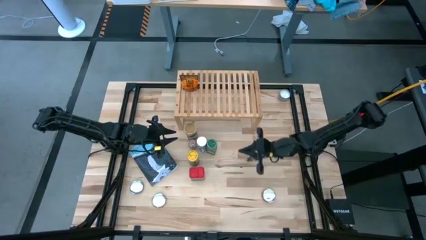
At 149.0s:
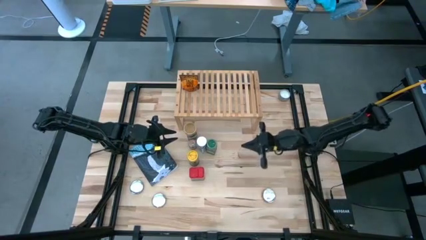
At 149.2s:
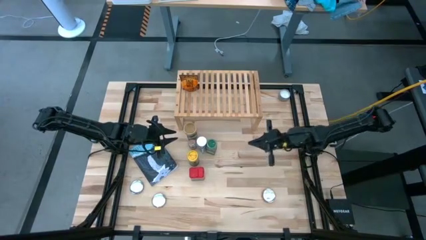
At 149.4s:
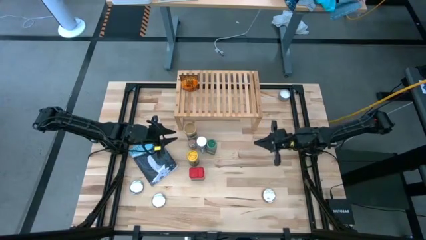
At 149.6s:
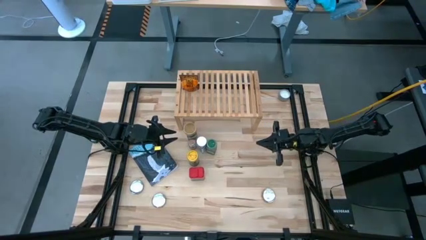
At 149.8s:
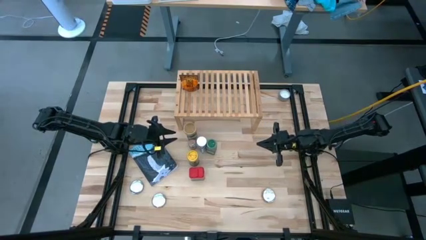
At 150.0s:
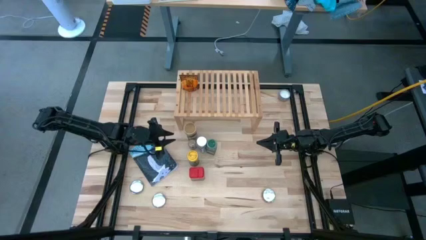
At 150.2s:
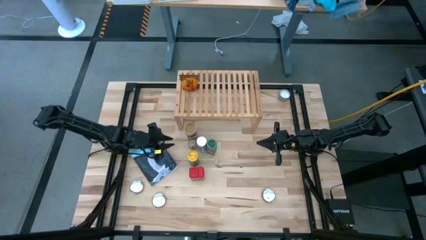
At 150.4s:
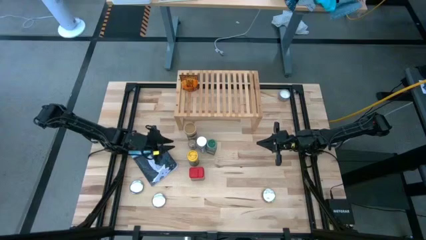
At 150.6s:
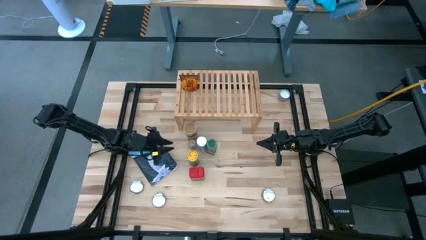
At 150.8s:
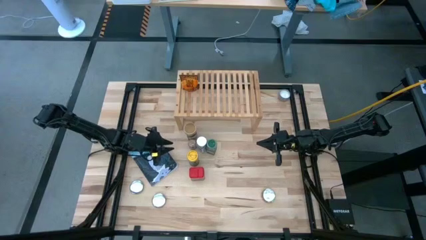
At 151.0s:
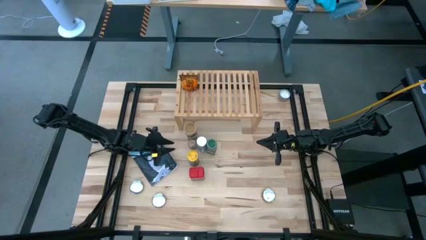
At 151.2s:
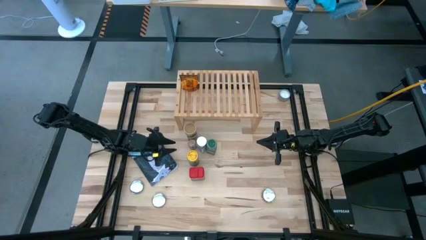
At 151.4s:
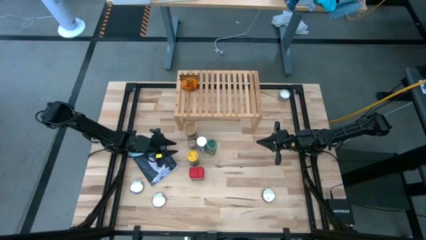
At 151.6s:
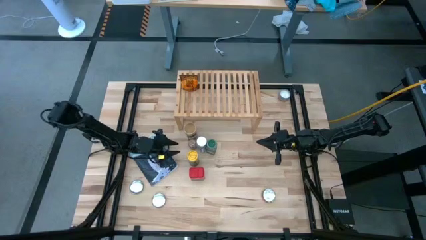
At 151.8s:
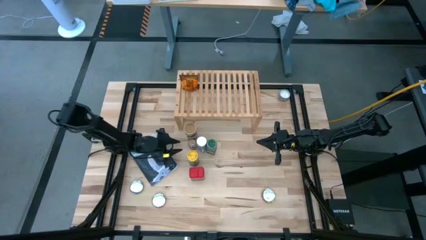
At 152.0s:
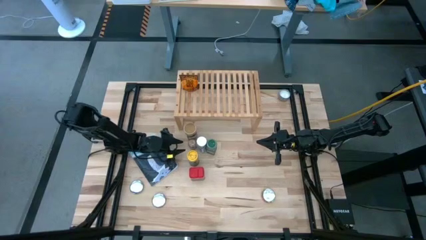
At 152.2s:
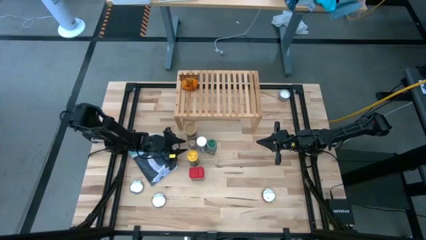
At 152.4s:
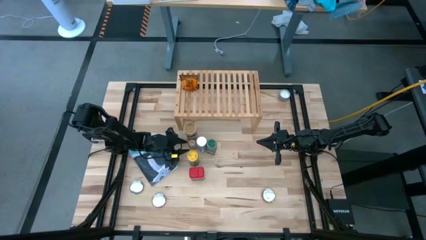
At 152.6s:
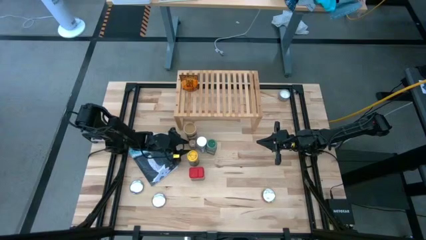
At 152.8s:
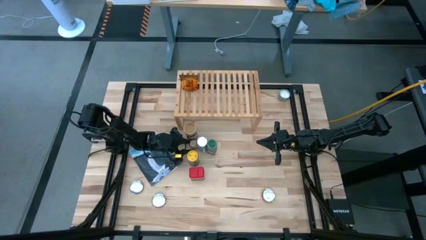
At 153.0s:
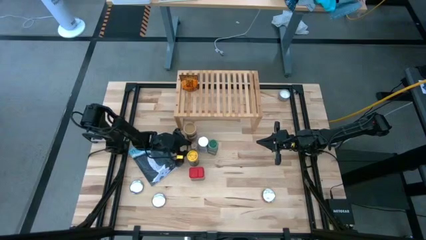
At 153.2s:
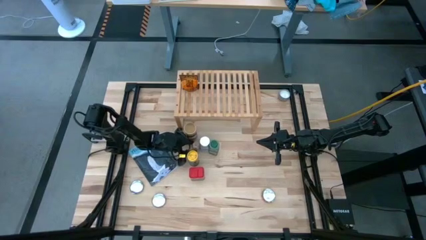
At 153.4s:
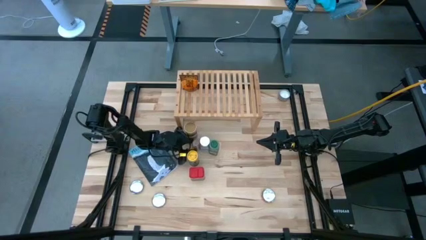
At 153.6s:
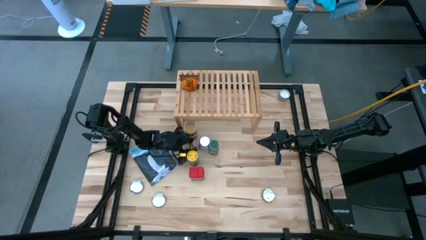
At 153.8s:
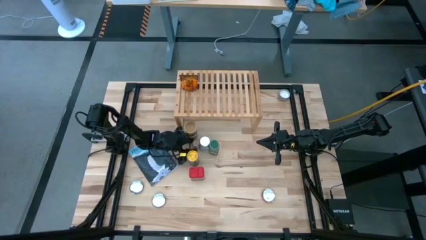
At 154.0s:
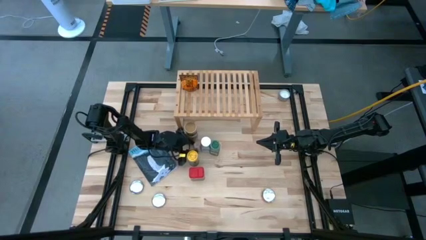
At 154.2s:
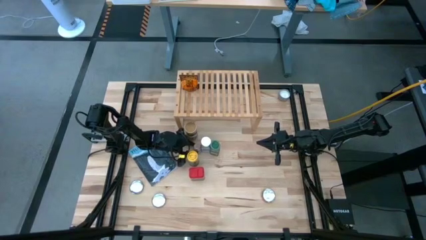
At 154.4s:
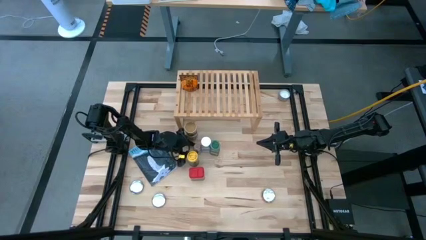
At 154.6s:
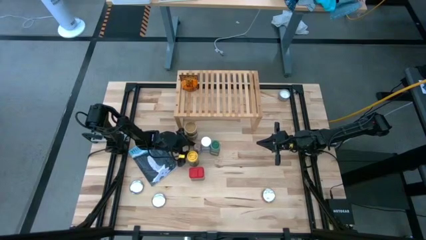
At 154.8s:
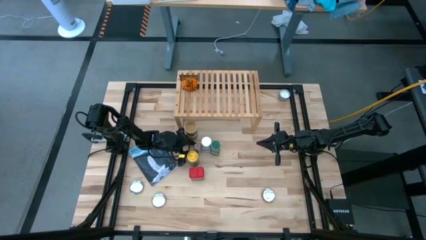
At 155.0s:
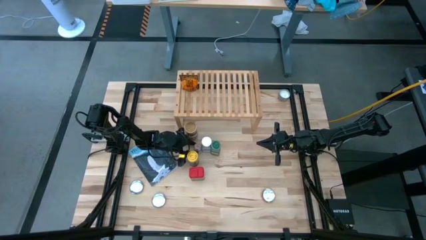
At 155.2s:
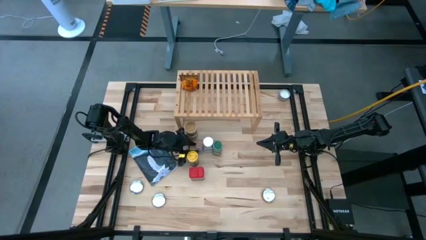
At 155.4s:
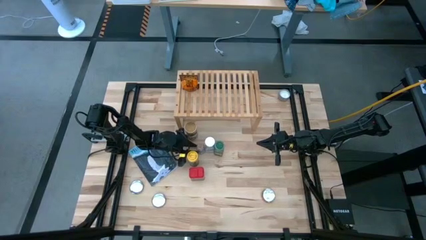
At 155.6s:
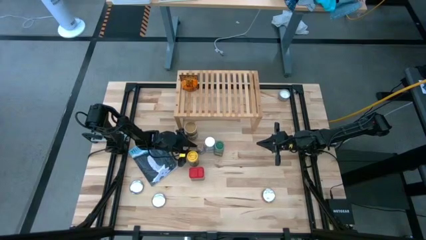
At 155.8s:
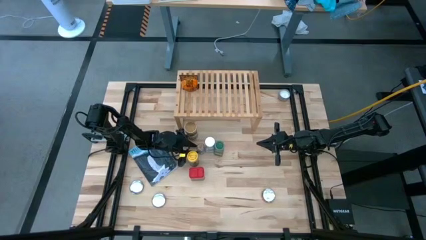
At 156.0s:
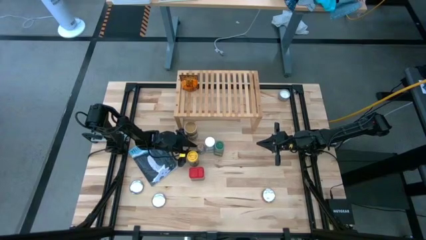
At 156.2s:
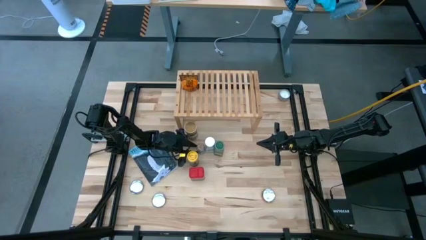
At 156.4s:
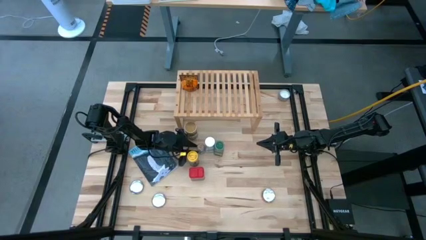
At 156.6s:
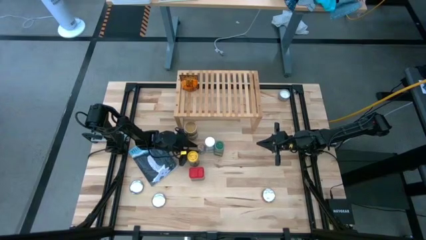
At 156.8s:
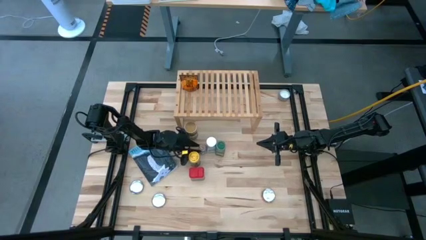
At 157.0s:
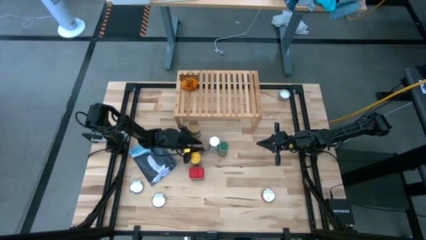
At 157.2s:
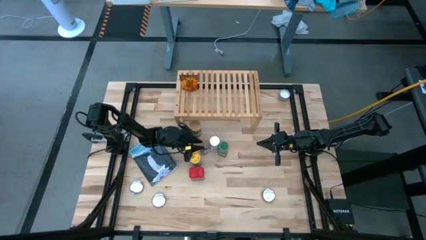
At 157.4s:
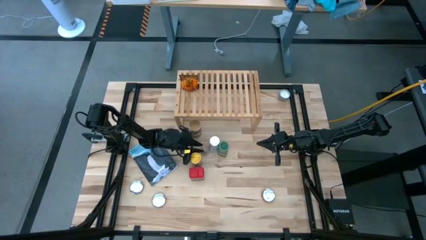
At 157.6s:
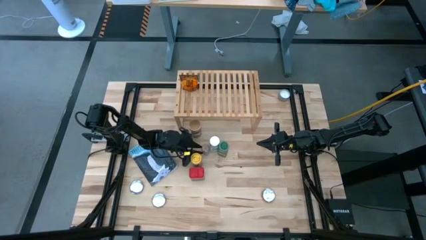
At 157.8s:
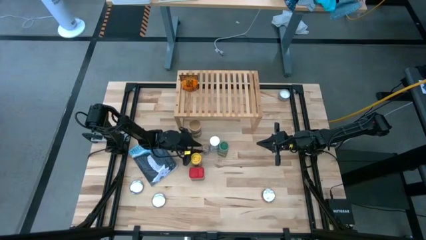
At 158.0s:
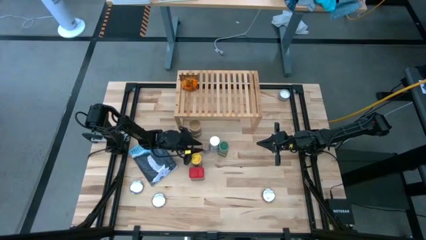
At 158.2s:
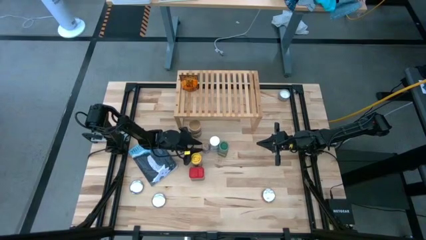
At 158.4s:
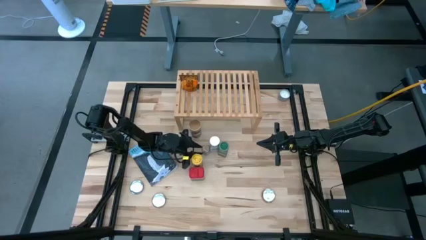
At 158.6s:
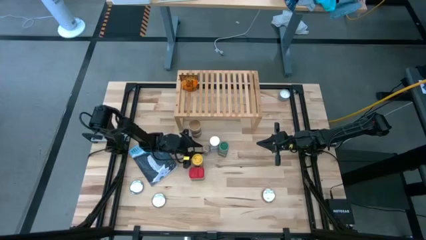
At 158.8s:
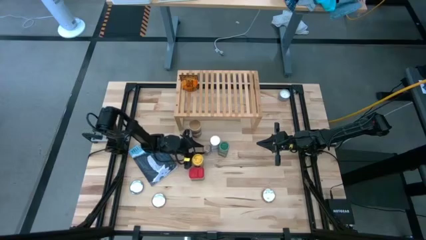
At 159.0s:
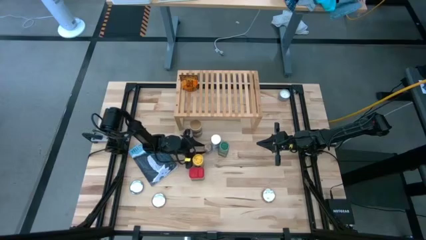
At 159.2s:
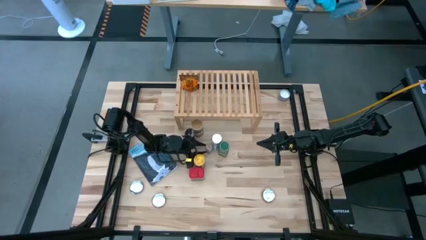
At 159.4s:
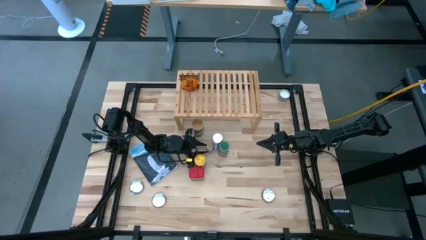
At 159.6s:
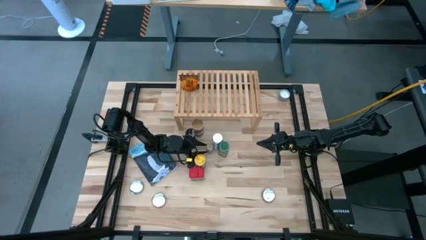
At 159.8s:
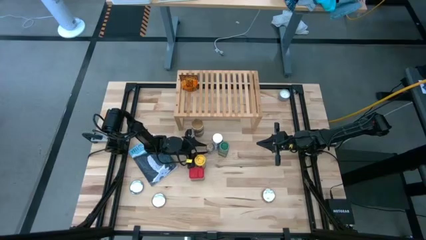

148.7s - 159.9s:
Task: Shelf spices
Put the transparent seasoning bottle on the shelf

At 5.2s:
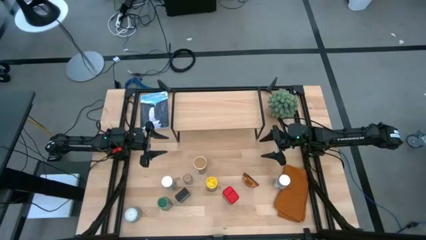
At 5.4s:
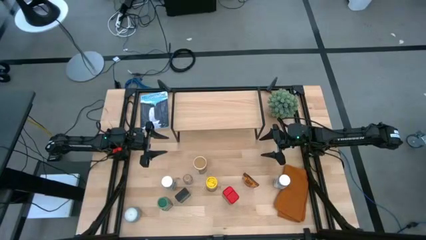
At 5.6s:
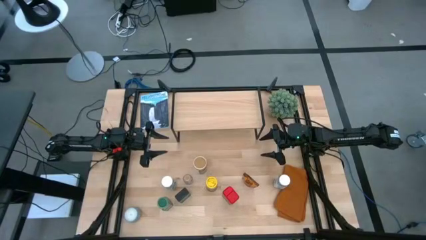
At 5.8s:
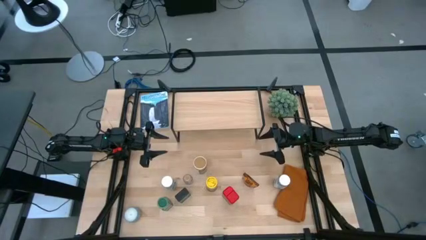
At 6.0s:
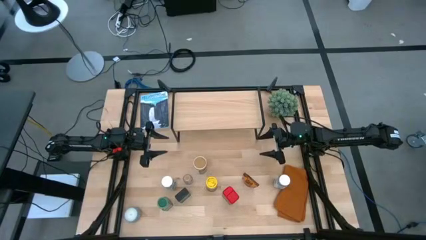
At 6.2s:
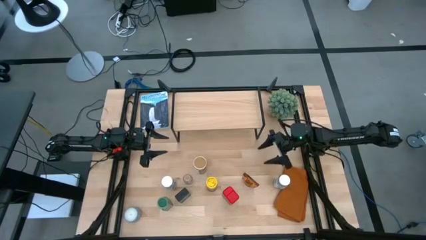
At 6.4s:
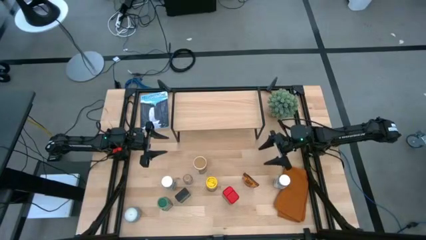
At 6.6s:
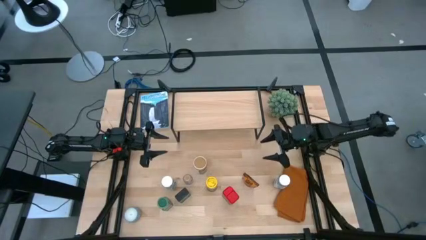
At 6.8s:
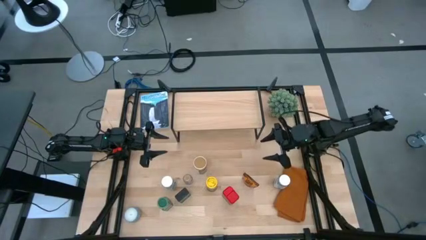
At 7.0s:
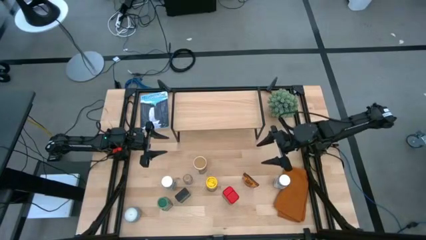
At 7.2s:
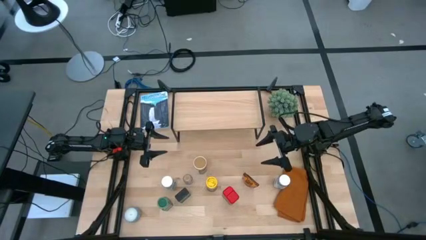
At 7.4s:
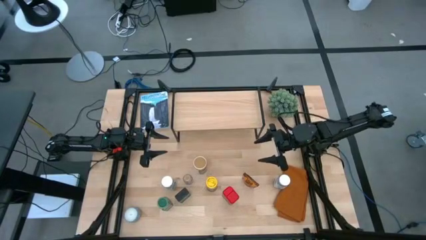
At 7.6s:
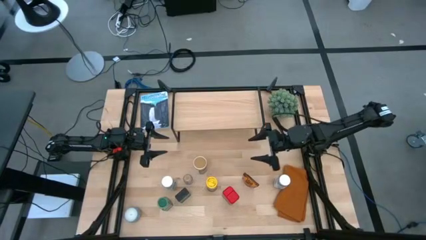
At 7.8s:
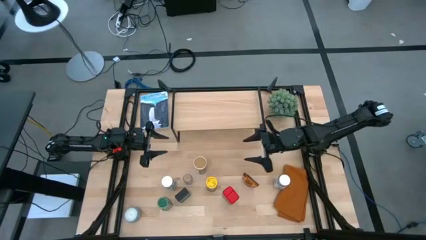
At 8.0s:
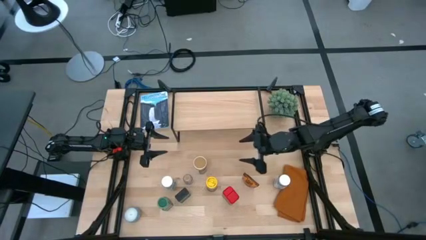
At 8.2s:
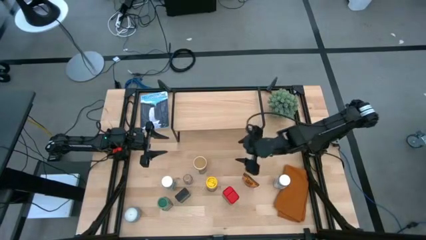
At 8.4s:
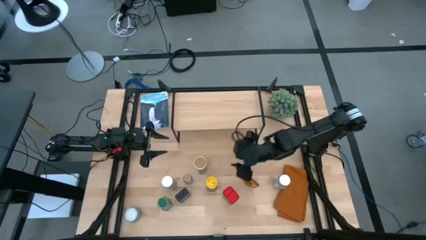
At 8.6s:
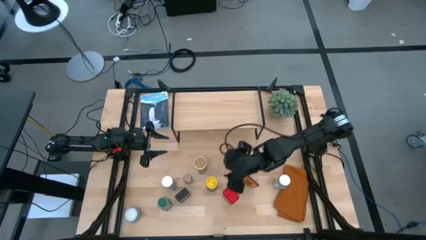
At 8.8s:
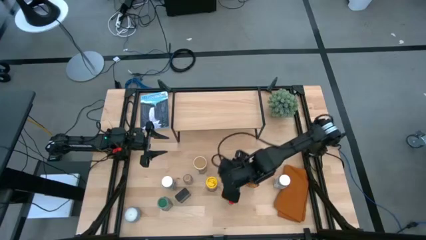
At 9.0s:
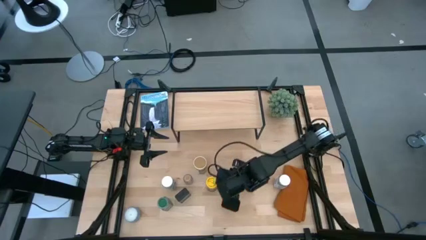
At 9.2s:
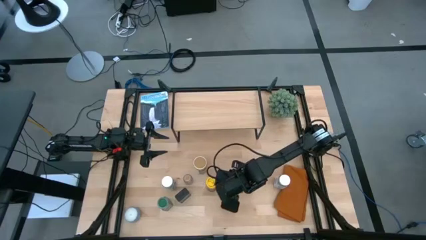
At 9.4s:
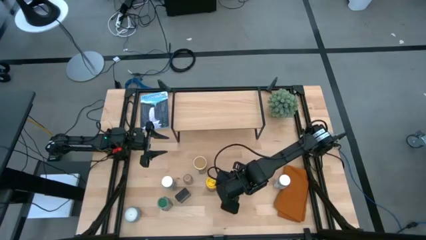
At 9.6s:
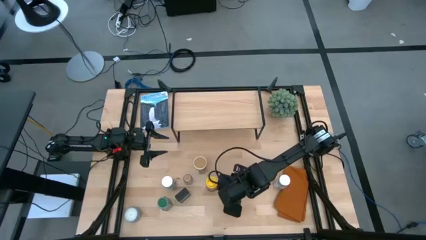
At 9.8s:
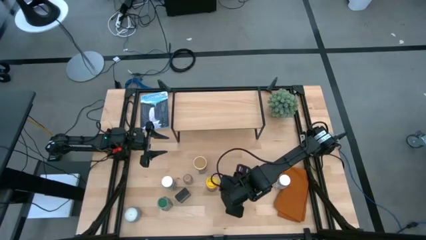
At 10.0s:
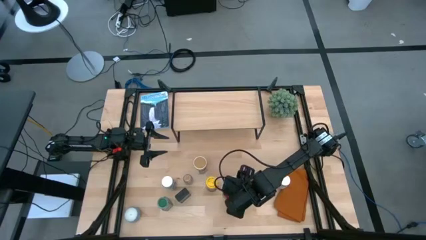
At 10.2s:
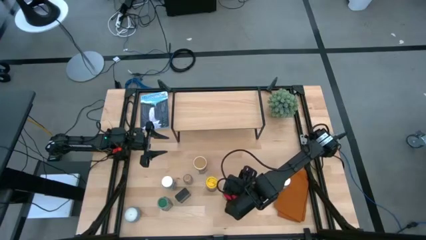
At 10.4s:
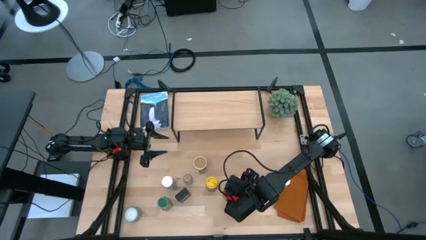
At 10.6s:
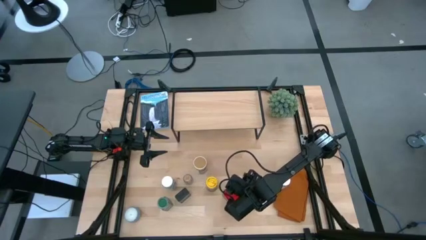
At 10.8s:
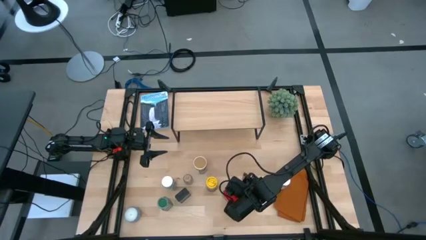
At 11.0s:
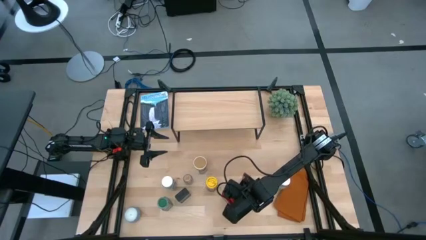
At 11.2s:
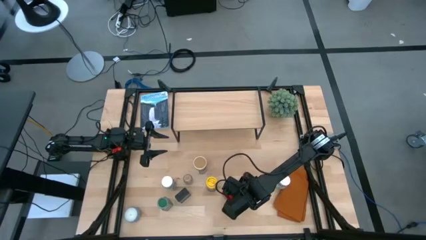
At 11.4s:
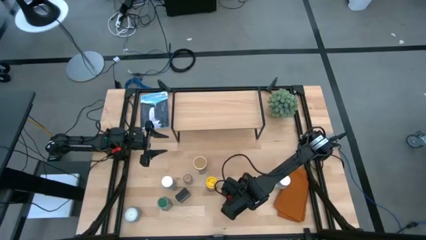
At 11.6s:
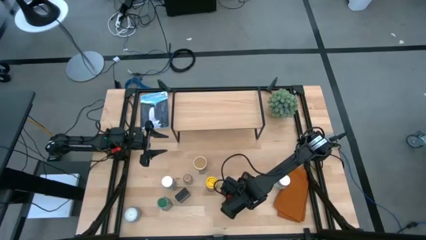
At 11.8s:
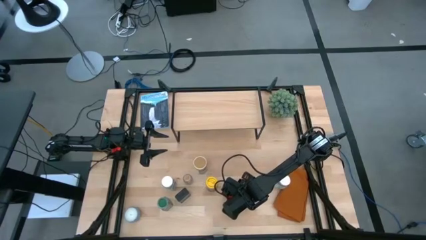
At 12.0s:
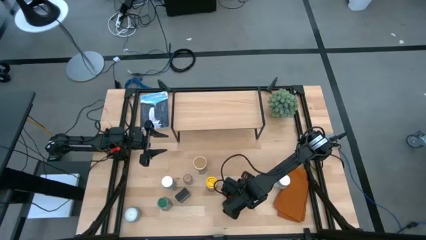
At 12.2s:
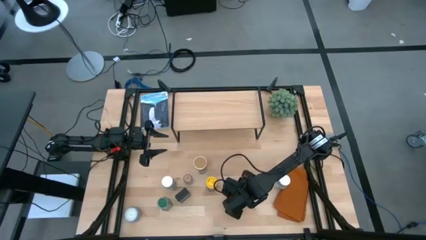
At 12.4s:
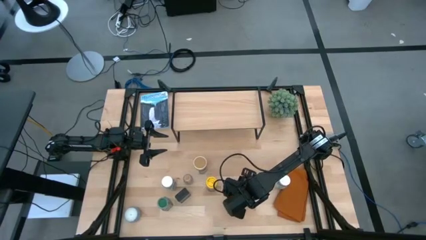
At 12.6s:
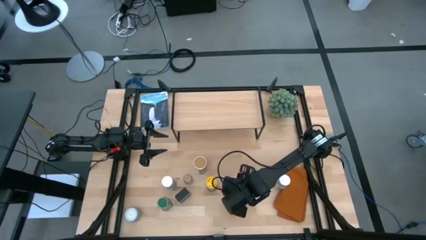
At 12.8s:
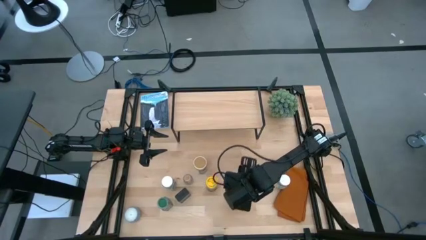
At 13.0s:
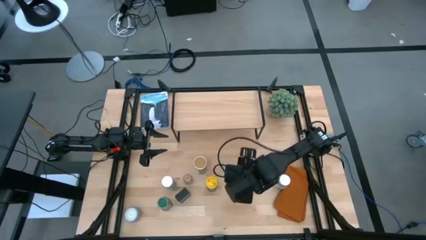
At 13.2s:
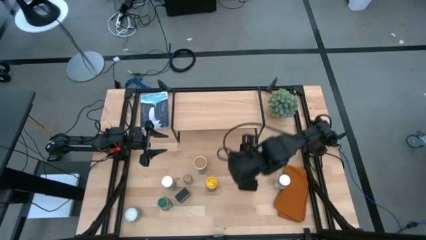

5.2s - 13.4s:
Task: Shelf spices
Put the red seasoning can on the shelf
